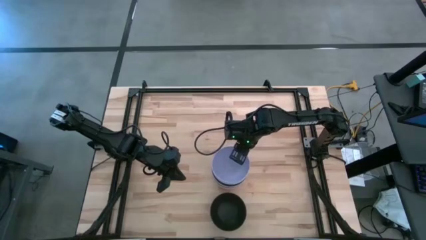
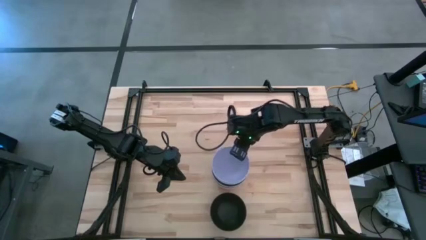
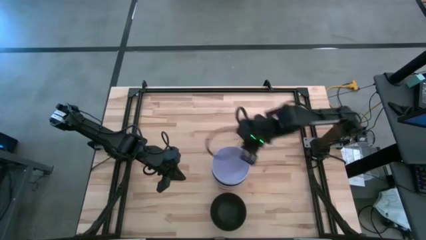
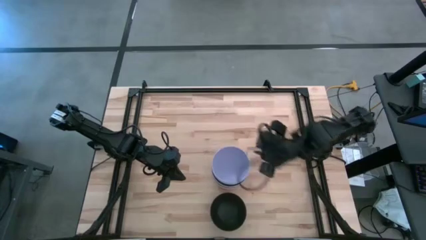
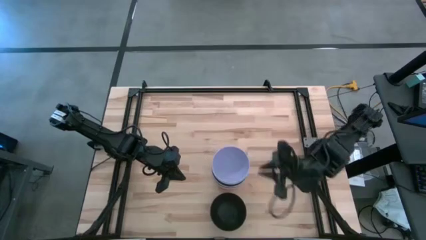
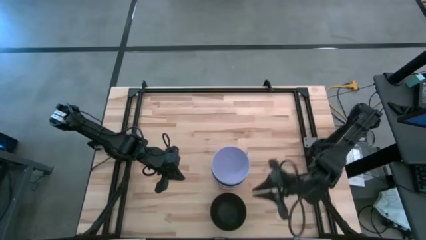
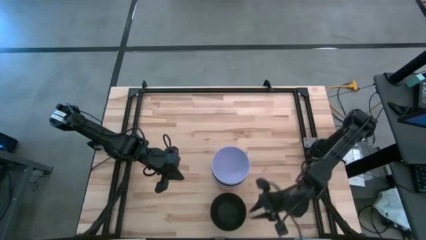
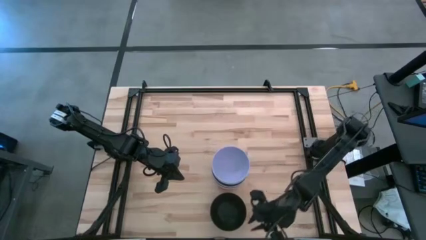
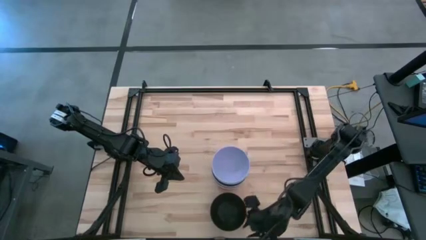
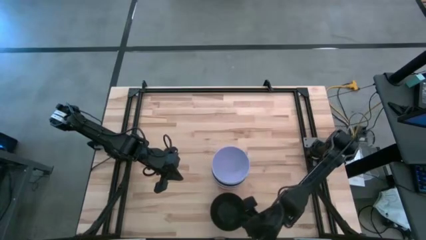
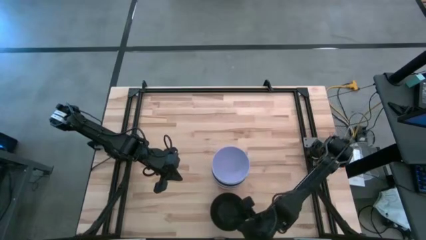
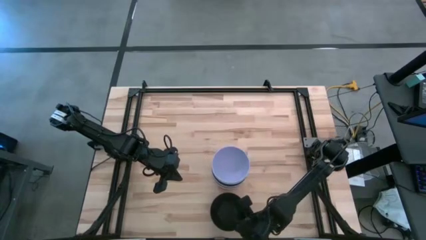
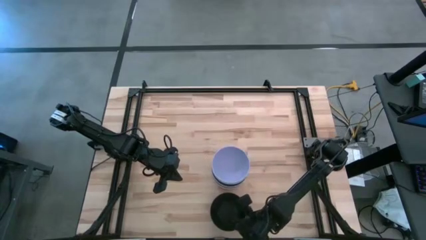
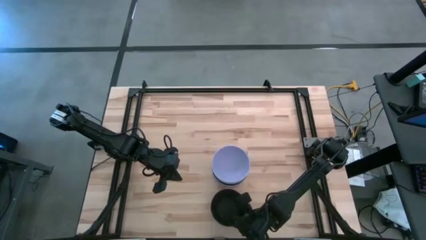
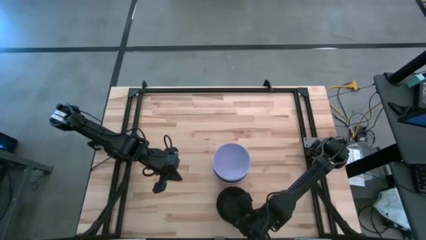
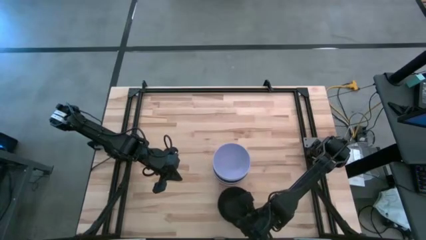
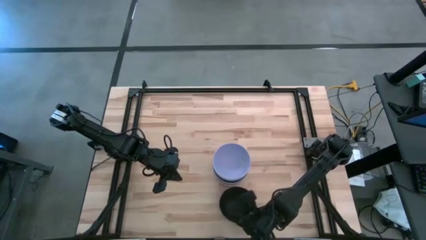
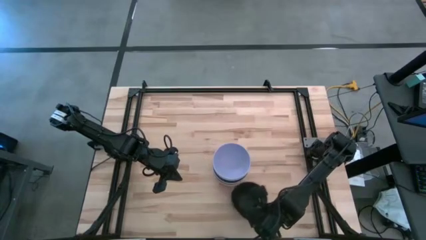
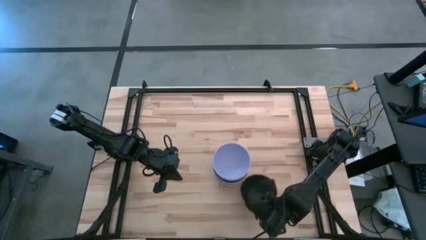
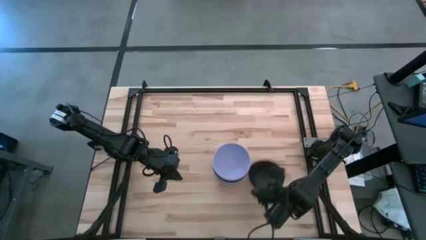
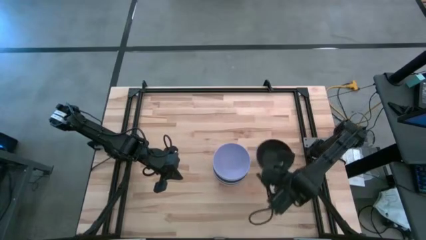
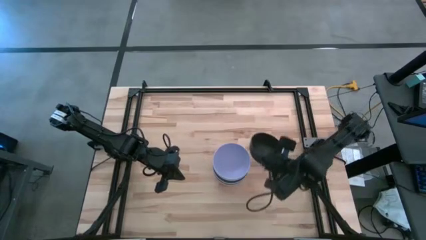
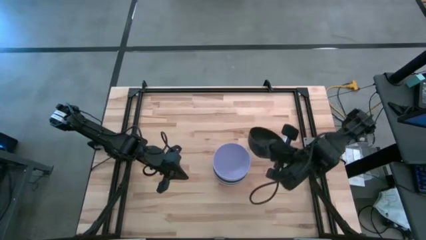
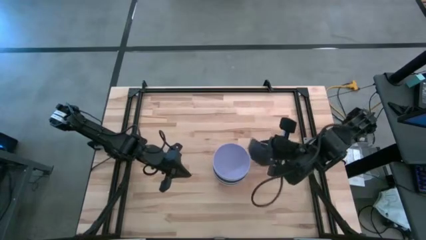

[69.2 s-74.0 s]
Task: Nest bowls inside each other
Stack the black bowl on top of the purple bowl

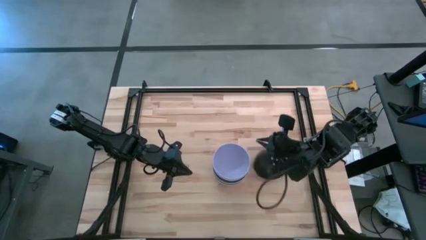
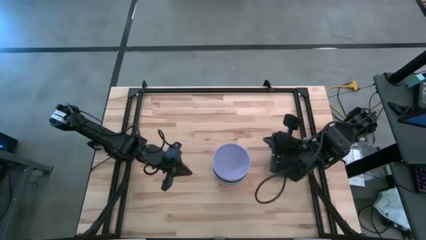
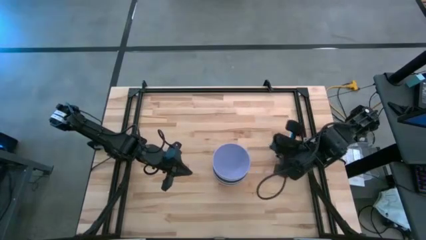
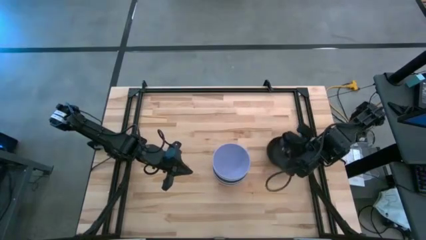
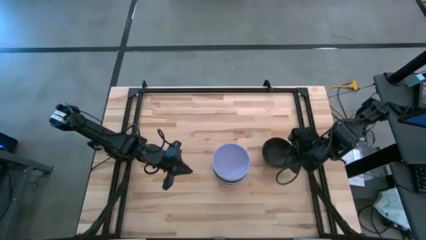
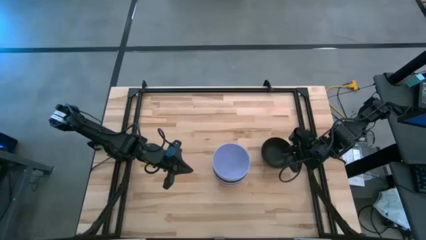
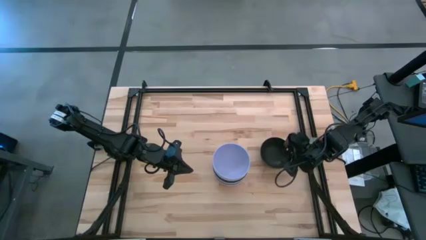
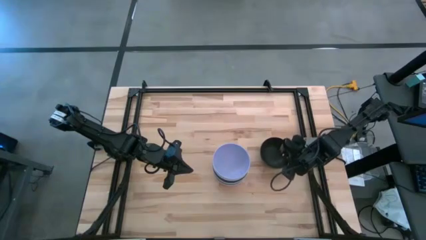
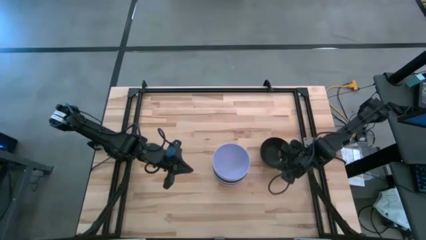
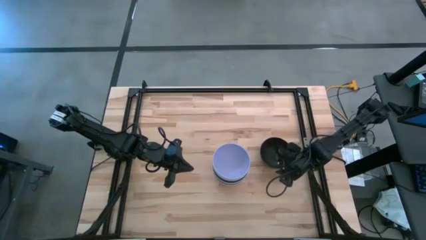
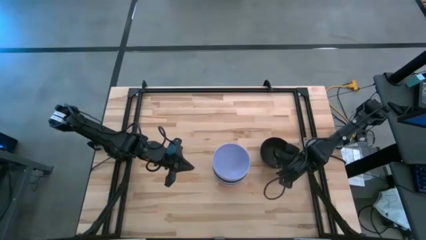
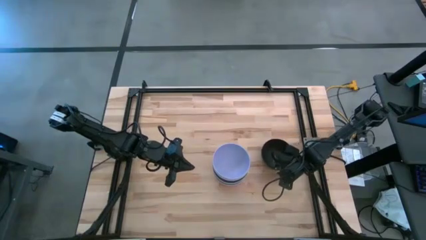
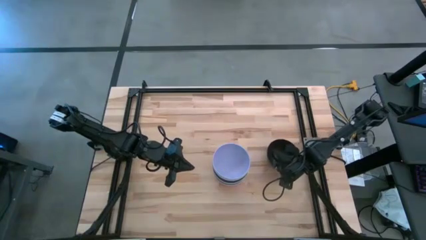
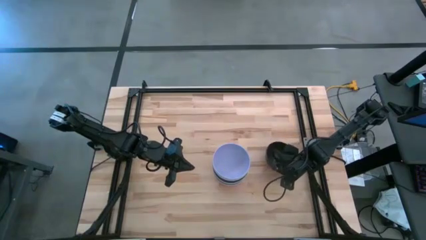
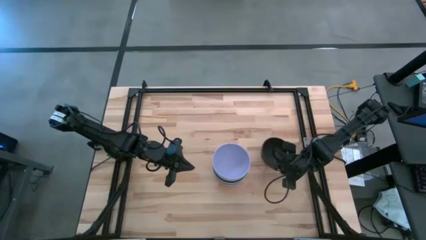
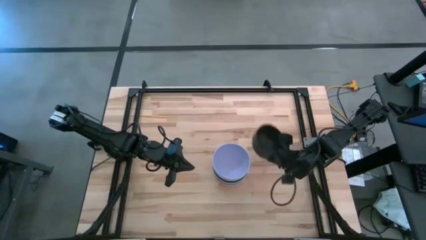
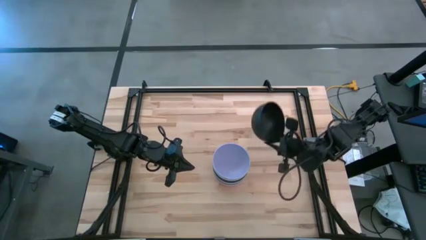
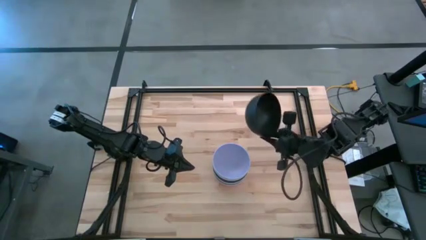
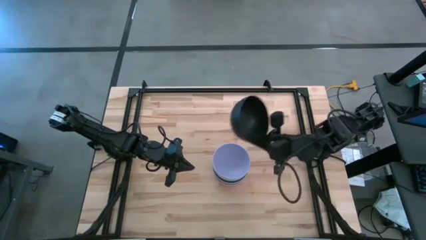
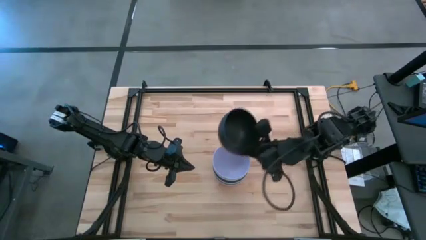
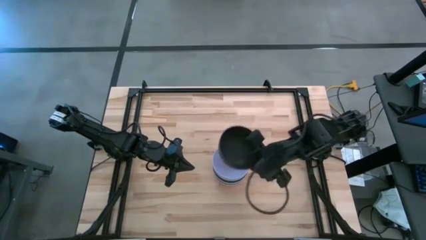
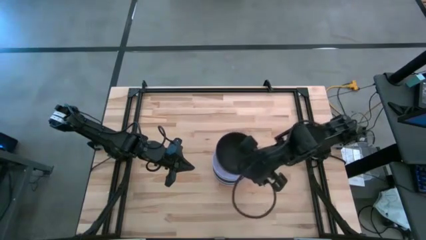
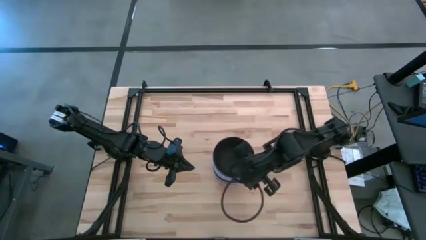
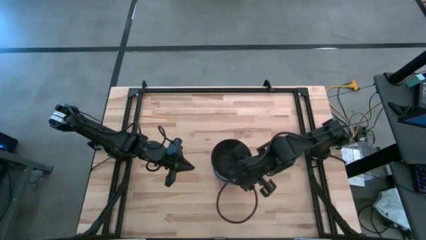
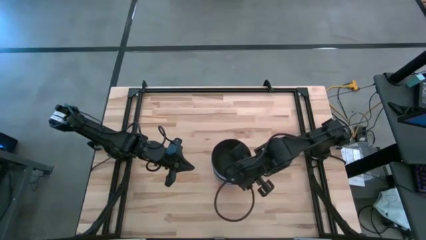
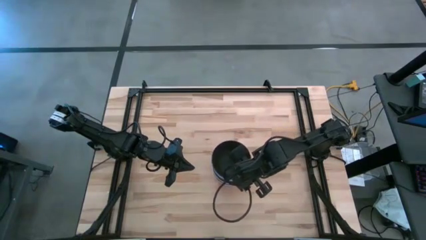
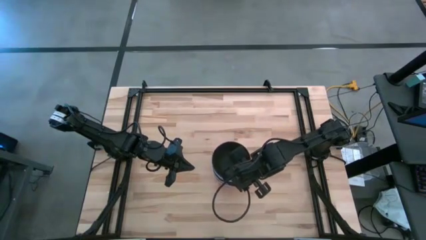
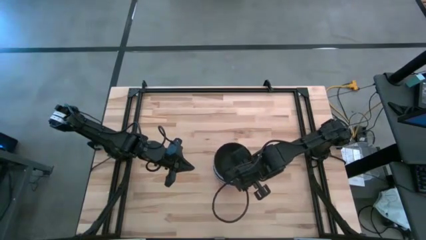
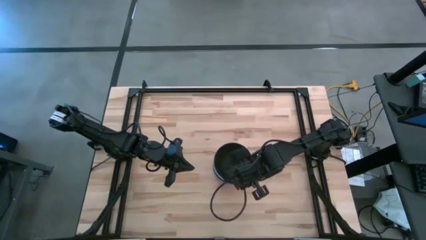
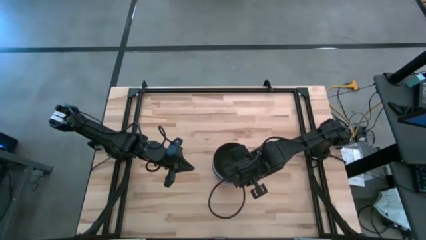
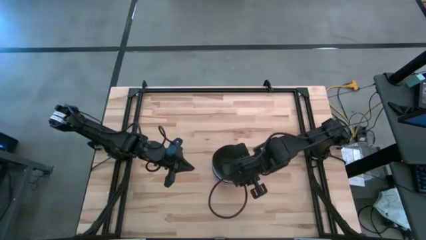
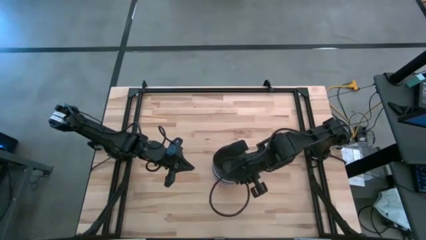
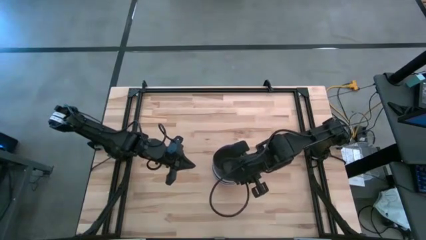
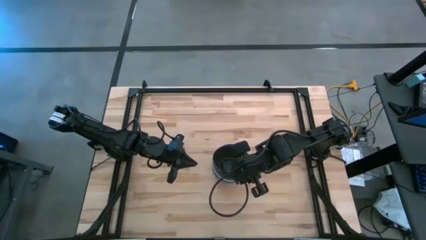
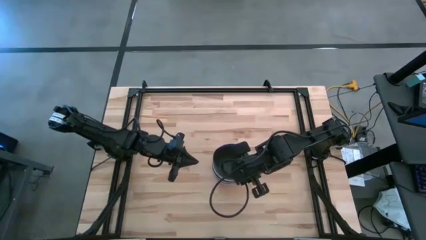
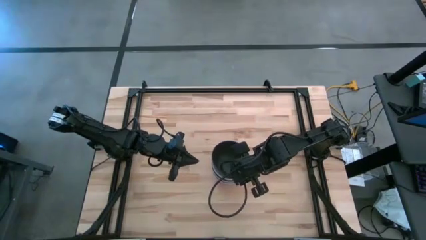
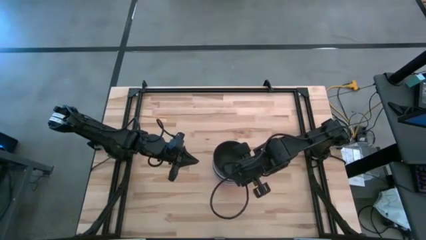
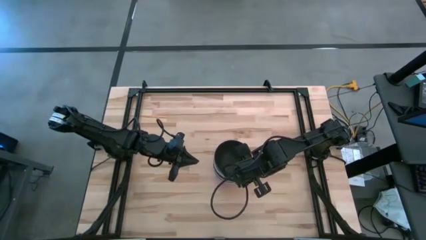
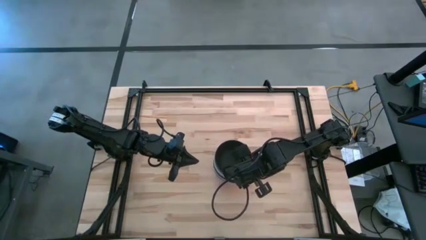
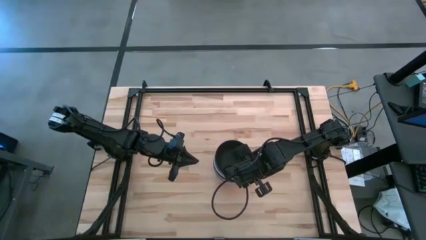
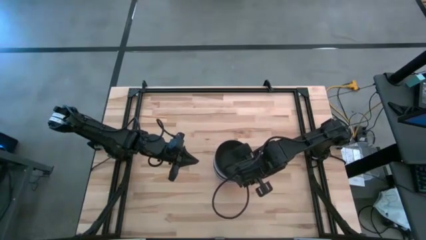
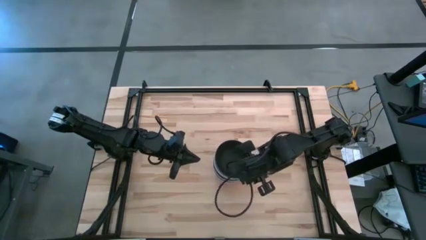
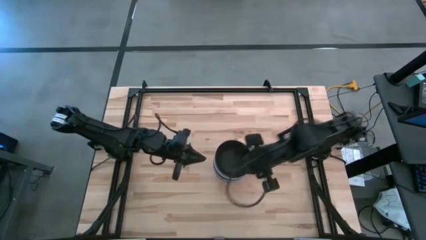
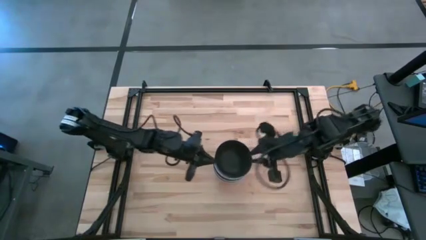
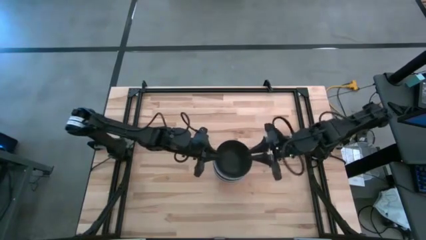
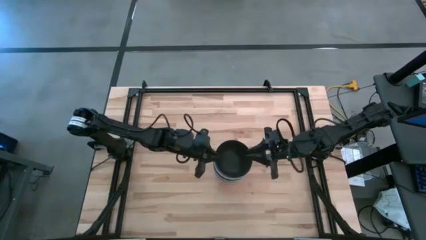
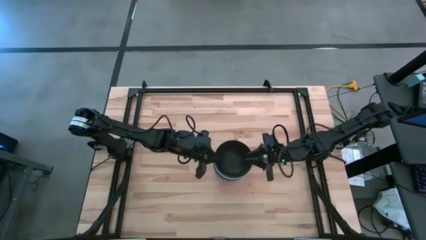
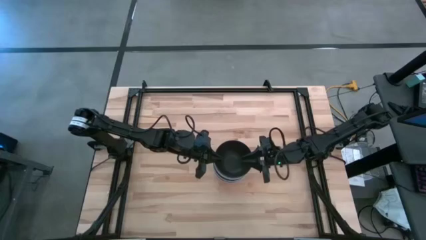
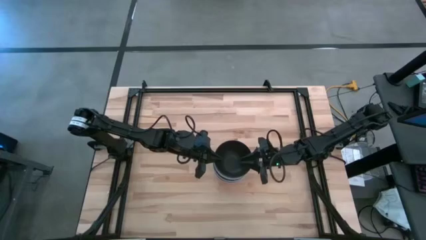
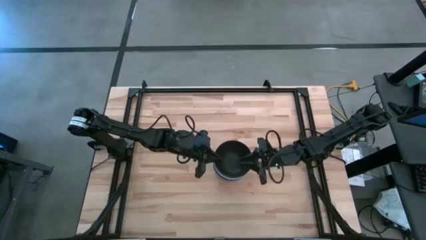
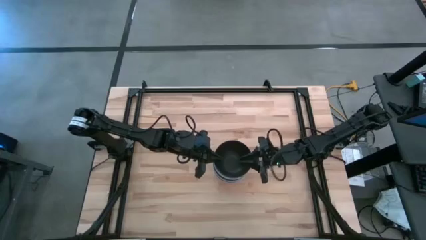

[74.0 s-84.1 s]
Stack the black bowl on top of the purple bowl

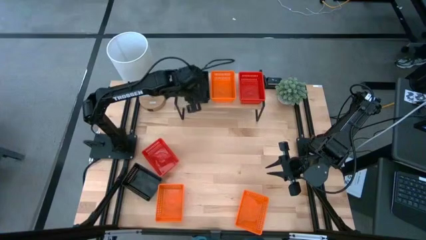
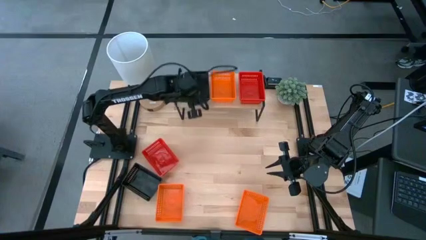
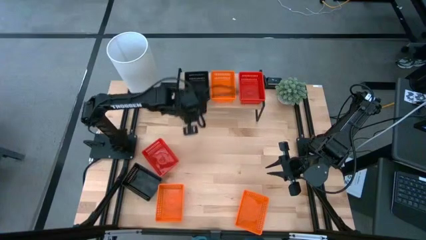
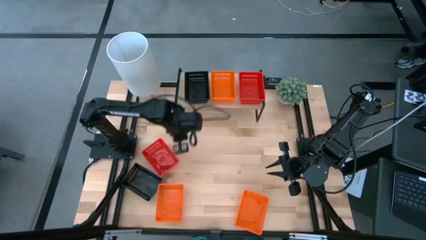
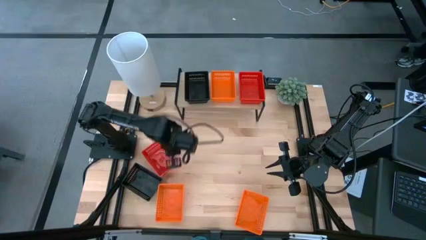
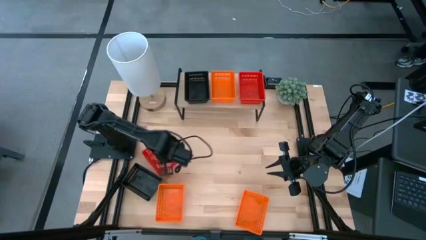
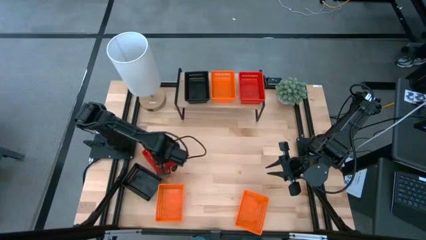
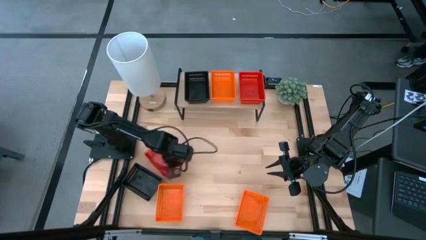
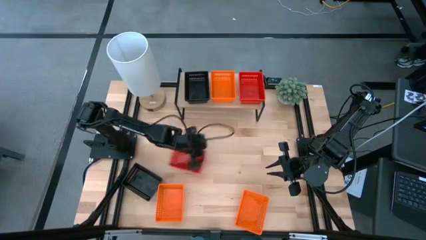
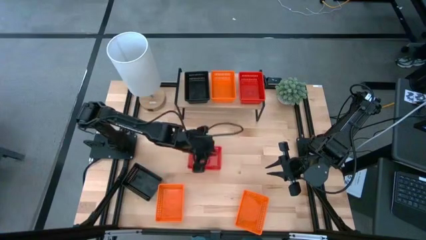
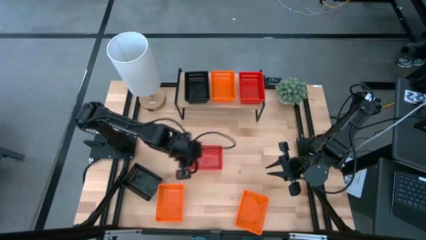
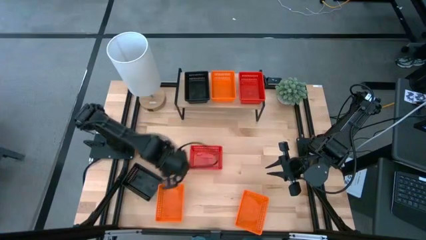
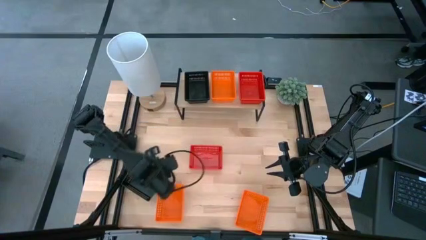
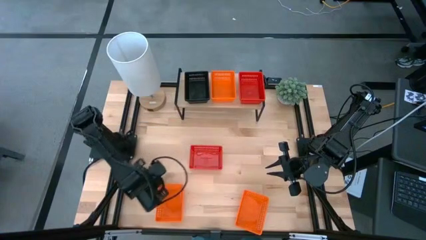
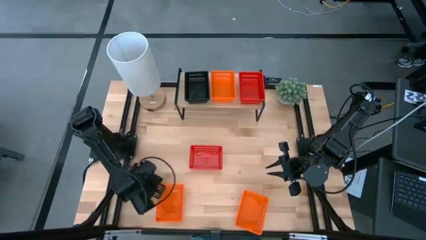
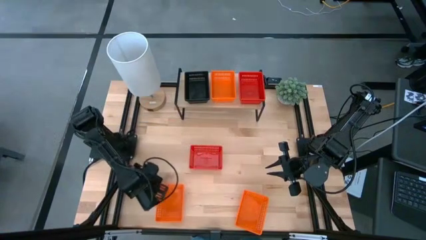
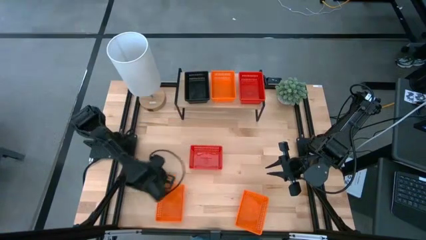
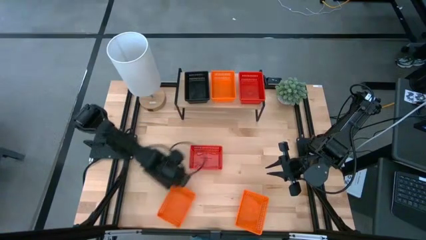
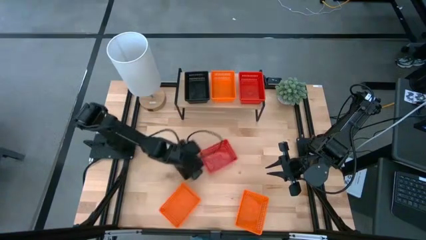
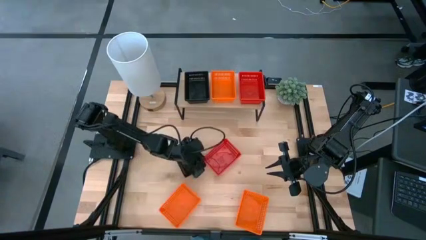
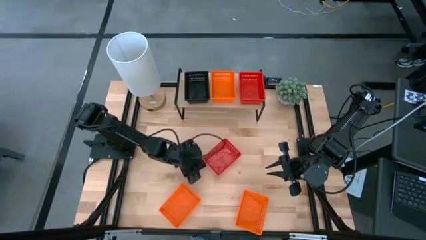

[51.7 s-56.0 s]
Task: Stack baskets on shelf by color
Move the bins to the center of the table
